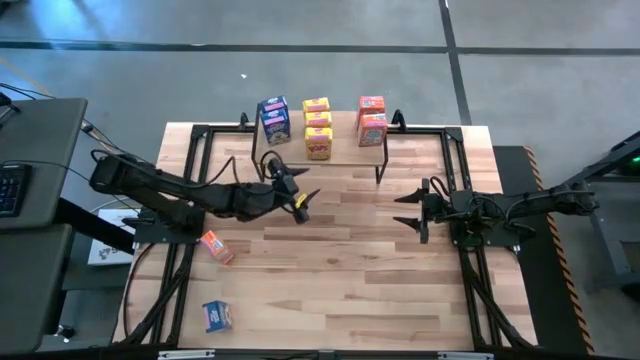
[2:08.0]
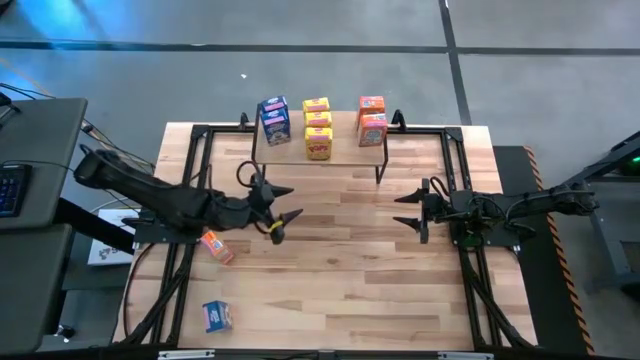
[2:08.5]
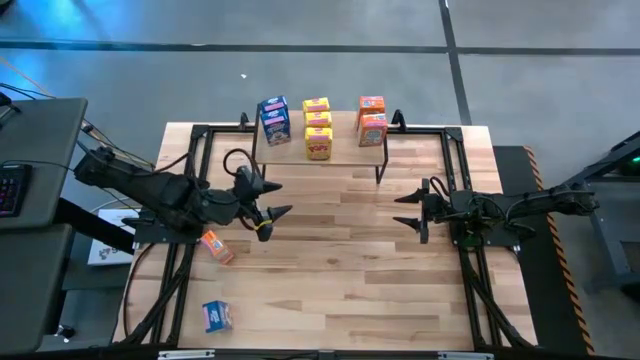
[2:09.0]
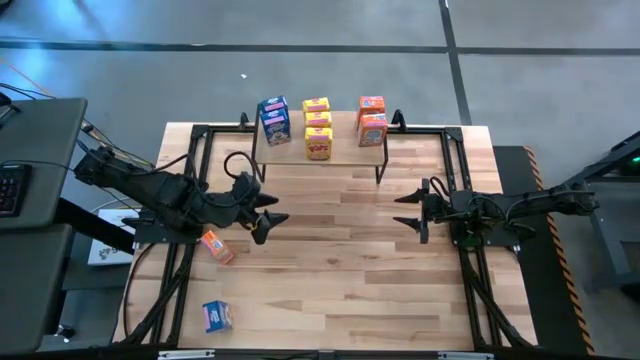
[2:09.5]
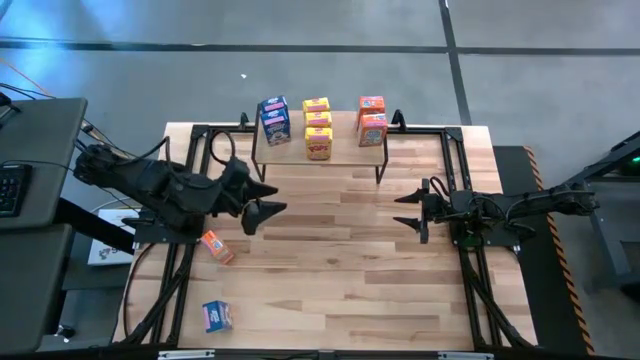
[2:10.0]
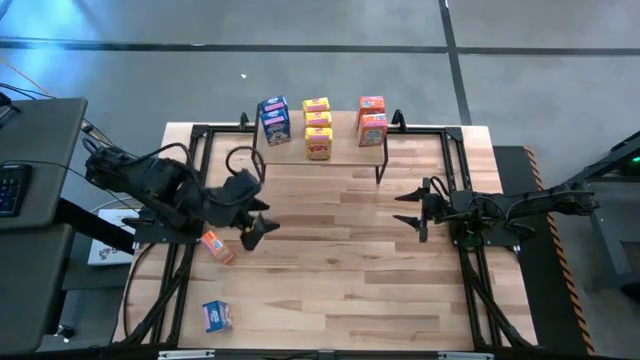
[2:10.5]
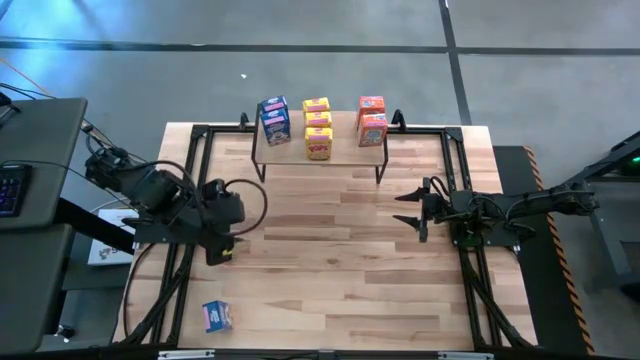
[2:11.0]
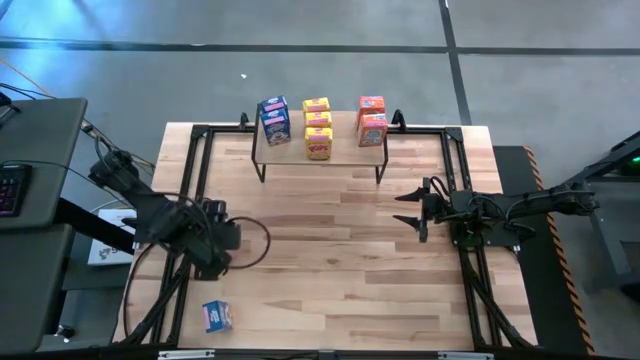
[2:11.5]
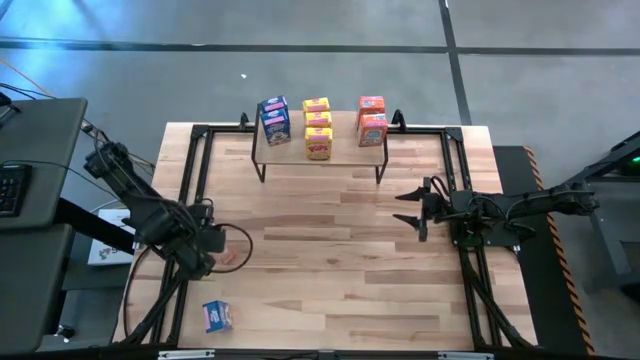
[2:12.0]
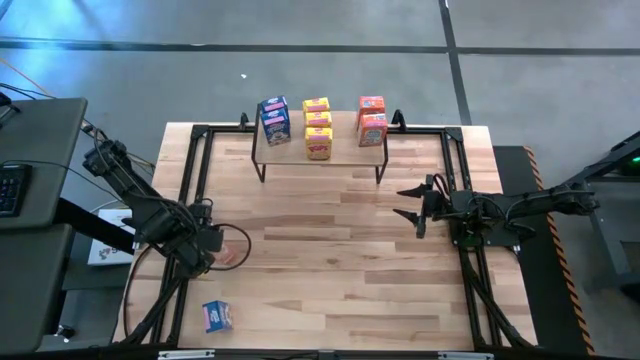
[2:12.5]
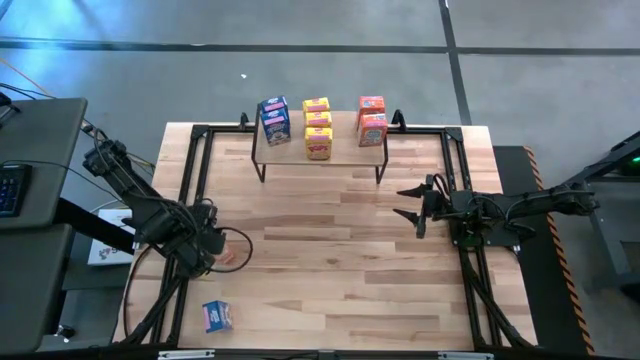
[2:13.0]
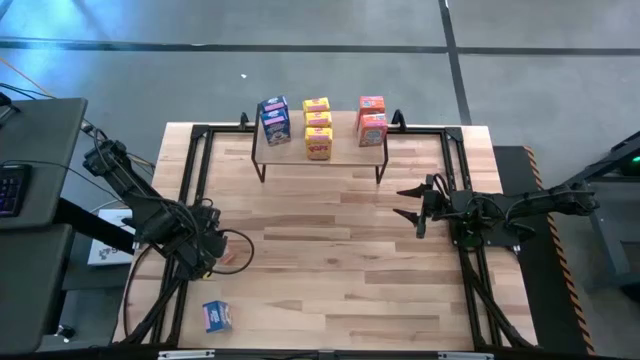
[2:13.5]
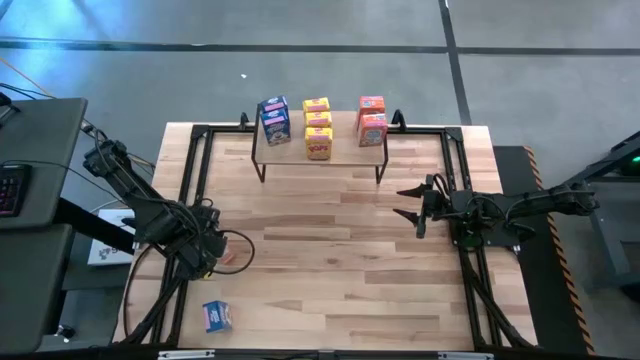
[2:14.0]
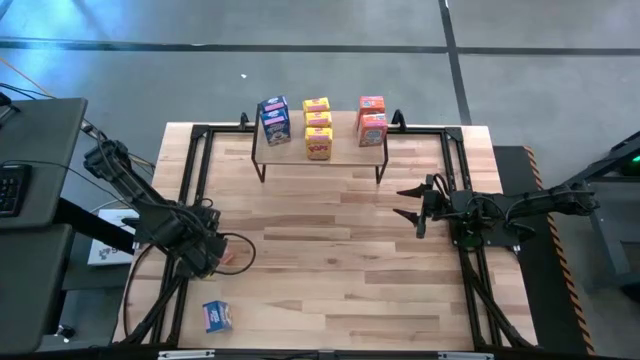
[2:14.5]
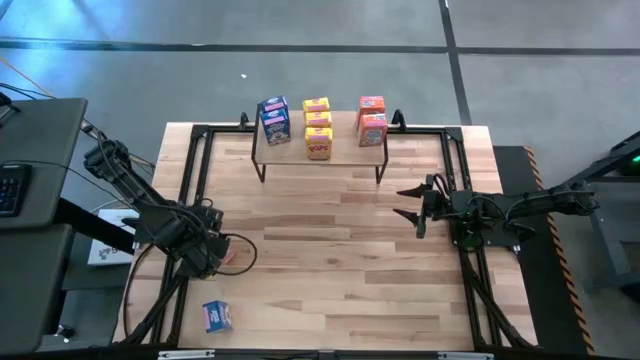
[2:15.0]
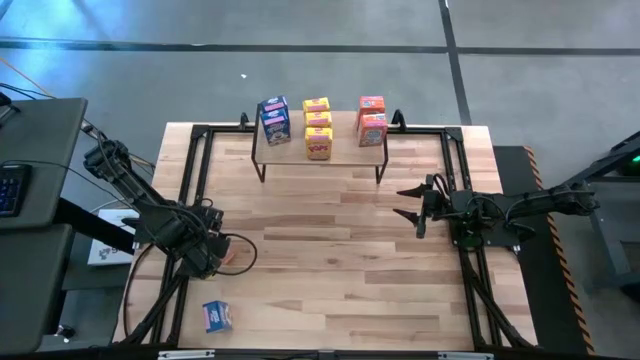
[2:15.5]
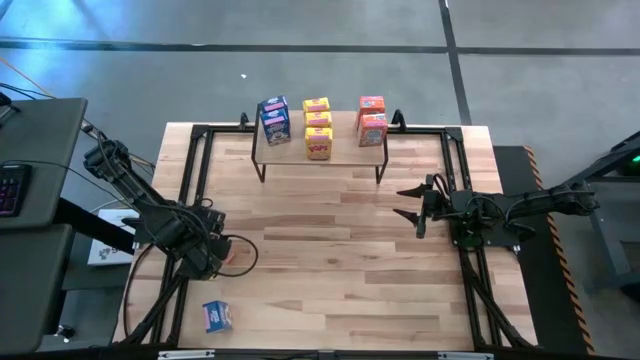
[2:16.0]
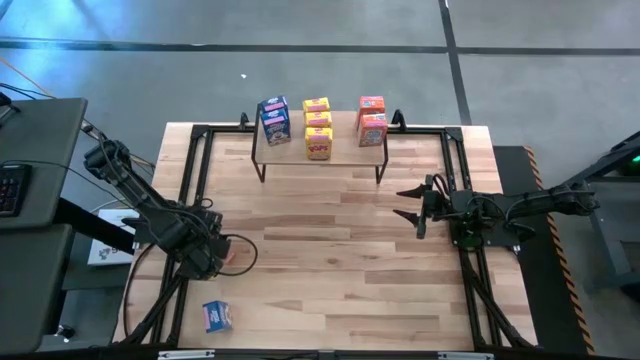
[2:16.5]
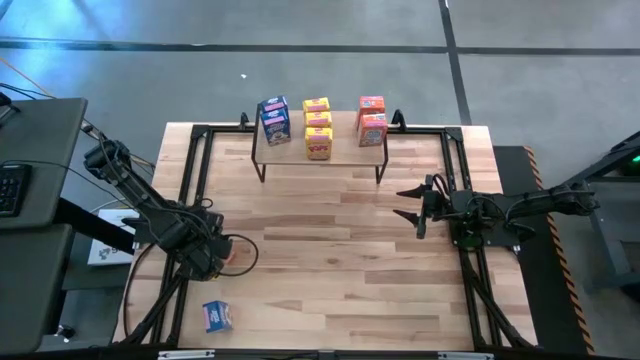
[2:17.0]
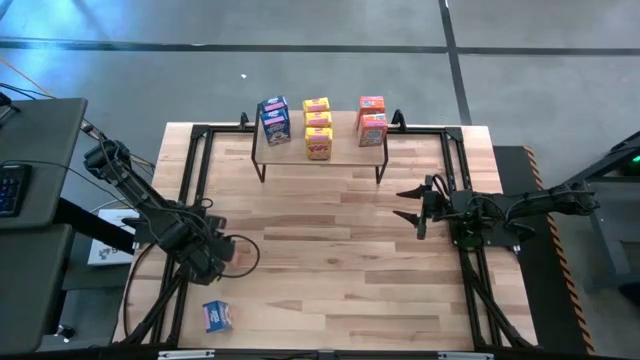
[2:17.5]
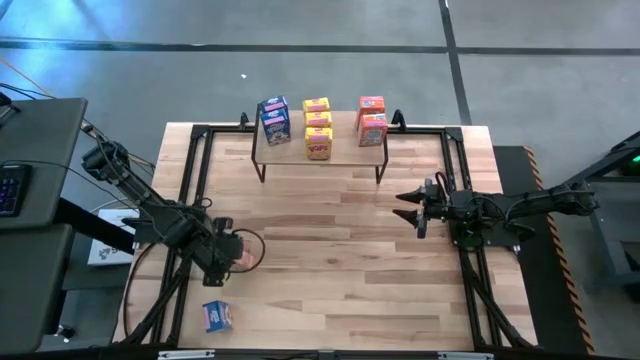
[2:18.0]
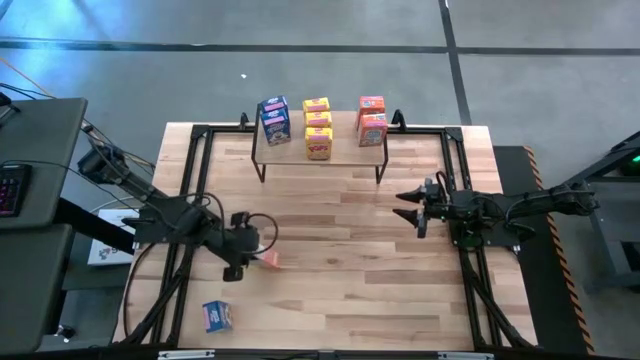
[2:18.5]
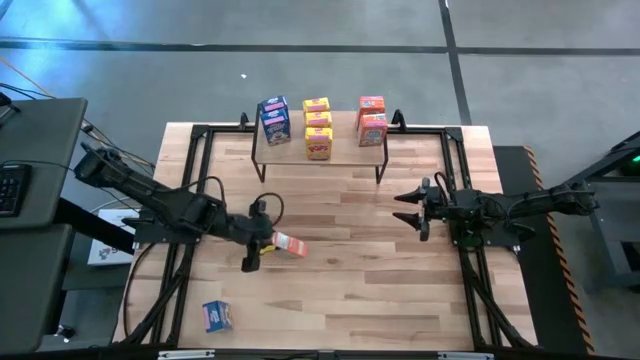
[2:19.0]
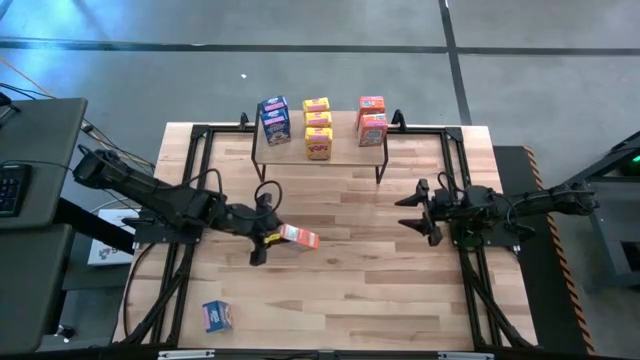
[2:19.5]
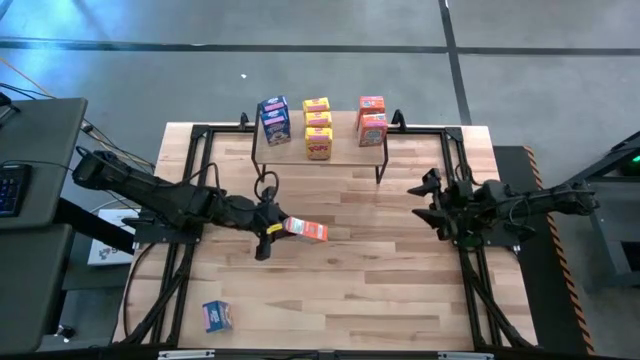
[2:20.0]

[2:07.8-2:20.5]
Task: Stack cereal on shelf
Put the orange cereal box and aligned with the other orange cereal boxes on the shelf

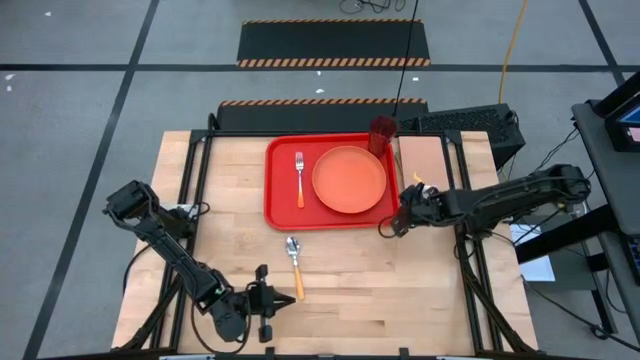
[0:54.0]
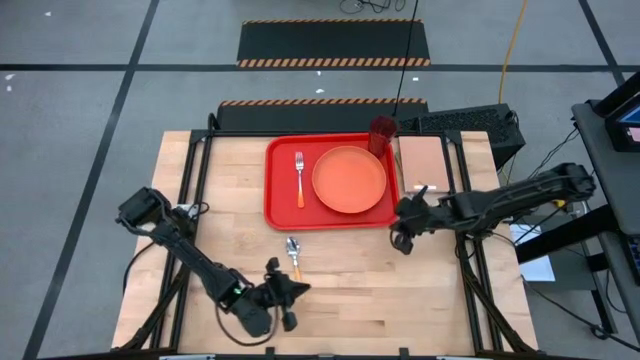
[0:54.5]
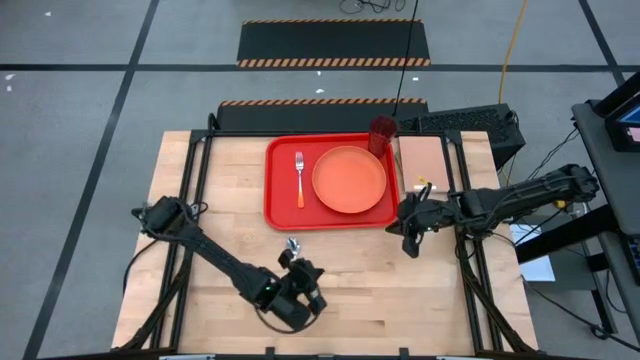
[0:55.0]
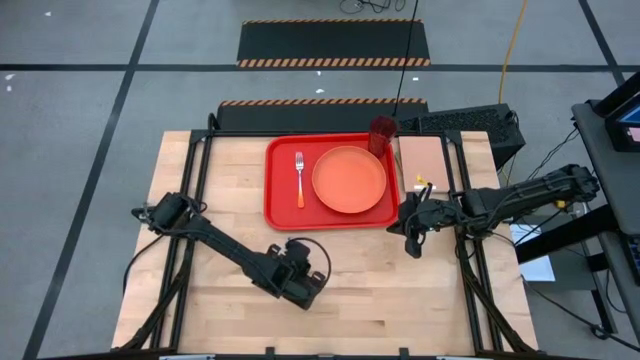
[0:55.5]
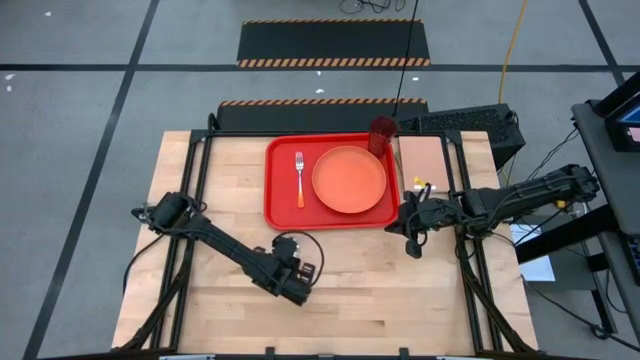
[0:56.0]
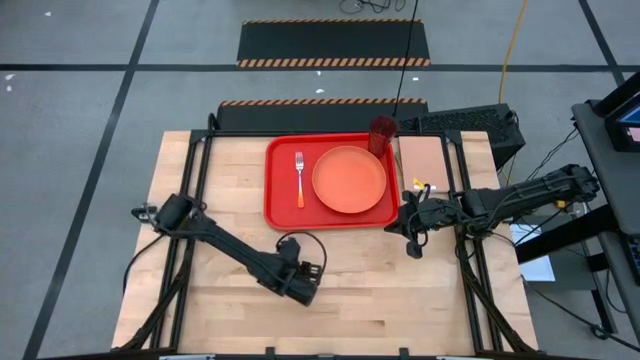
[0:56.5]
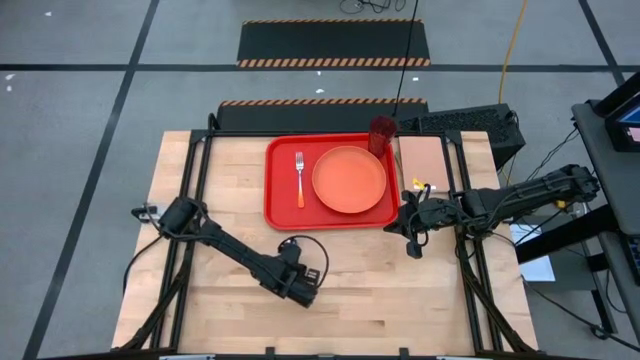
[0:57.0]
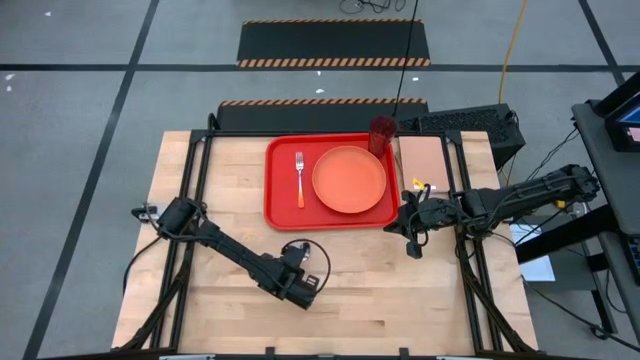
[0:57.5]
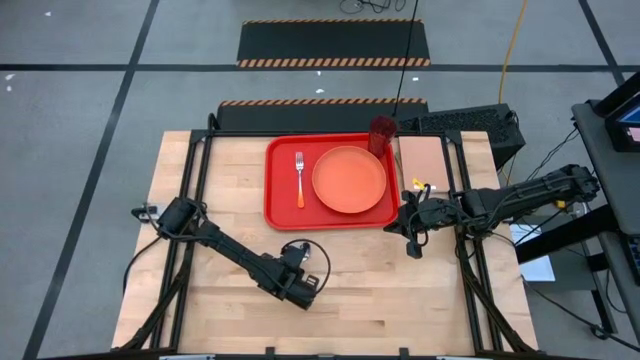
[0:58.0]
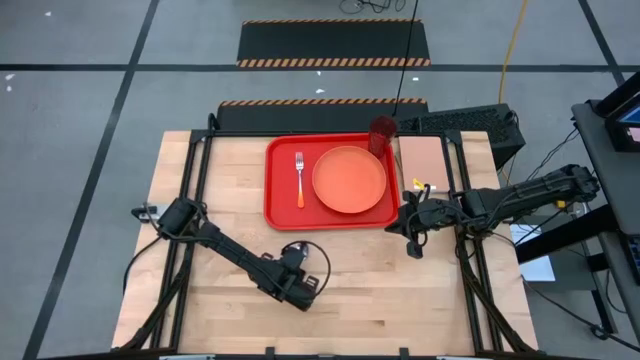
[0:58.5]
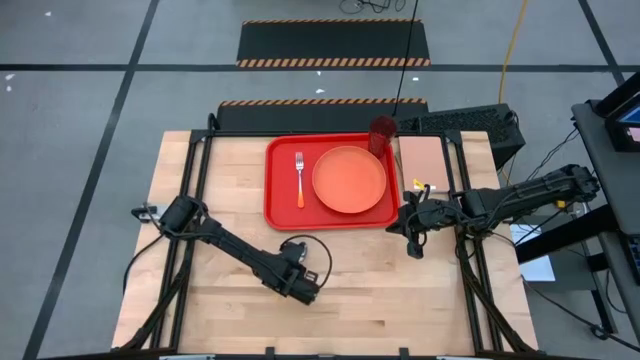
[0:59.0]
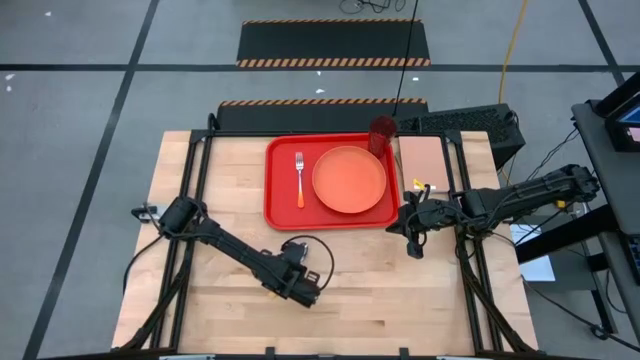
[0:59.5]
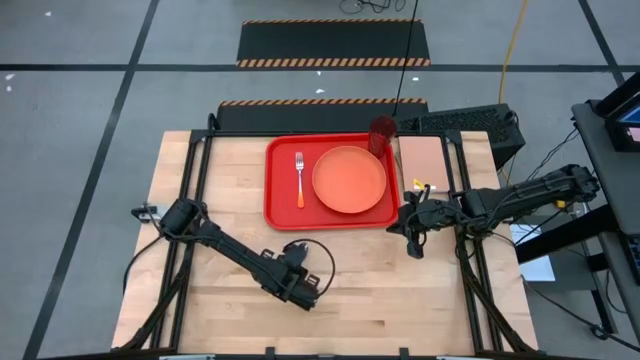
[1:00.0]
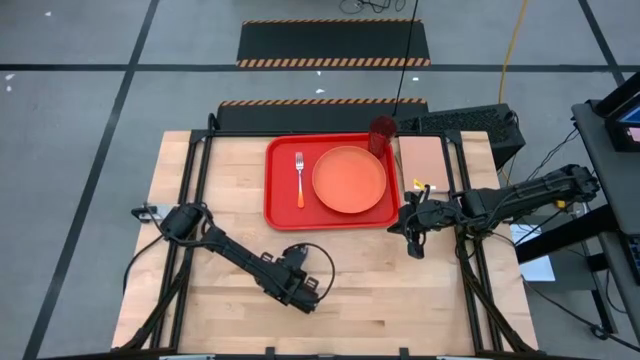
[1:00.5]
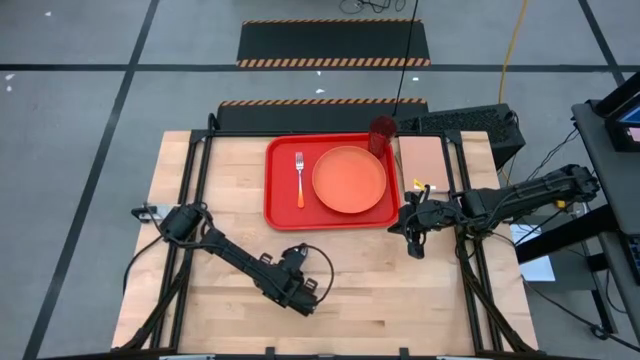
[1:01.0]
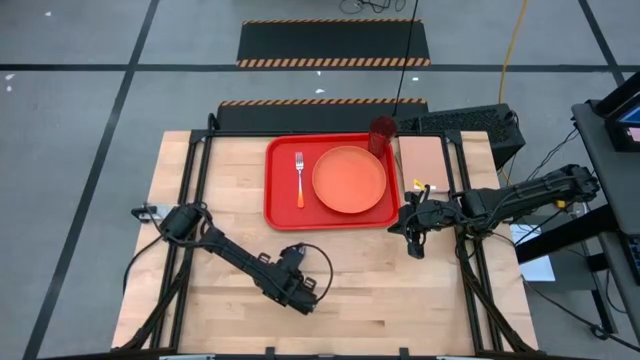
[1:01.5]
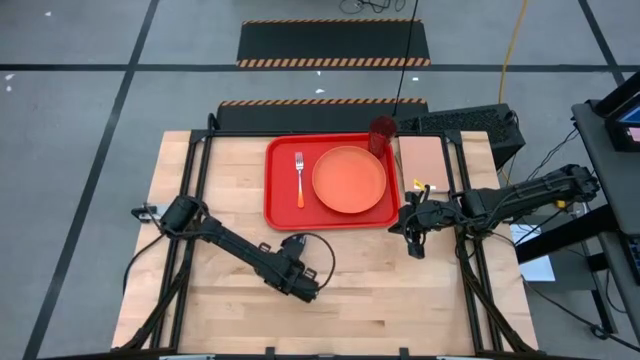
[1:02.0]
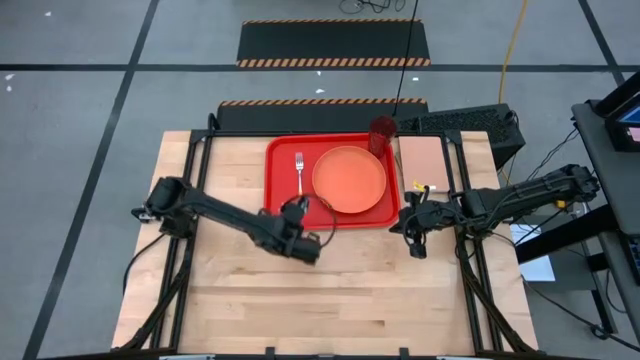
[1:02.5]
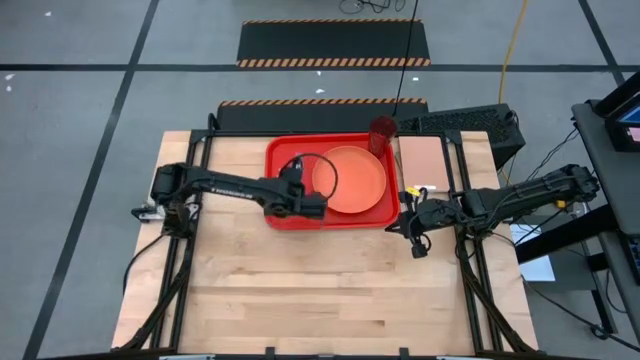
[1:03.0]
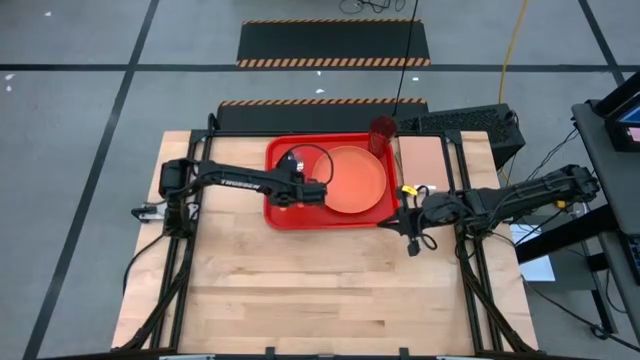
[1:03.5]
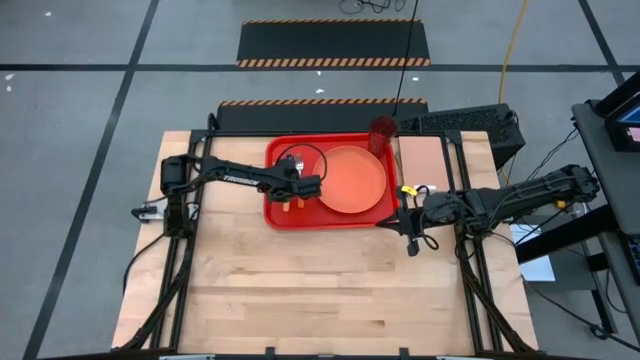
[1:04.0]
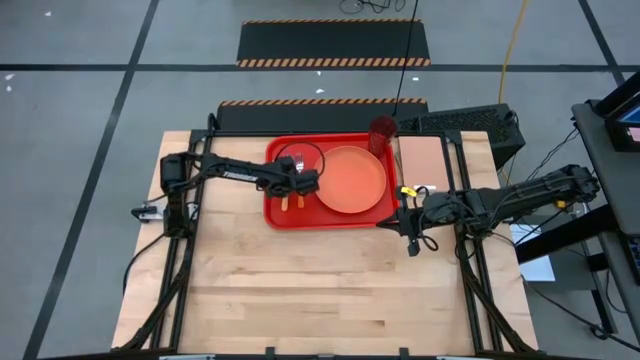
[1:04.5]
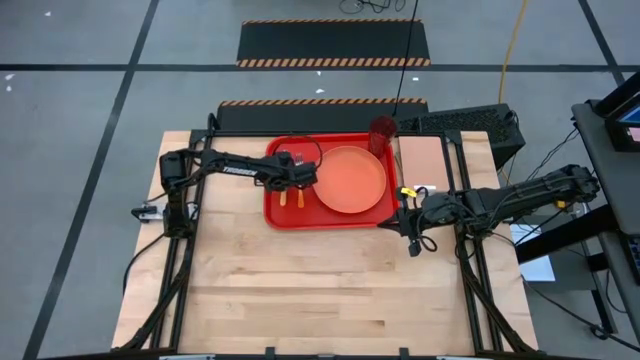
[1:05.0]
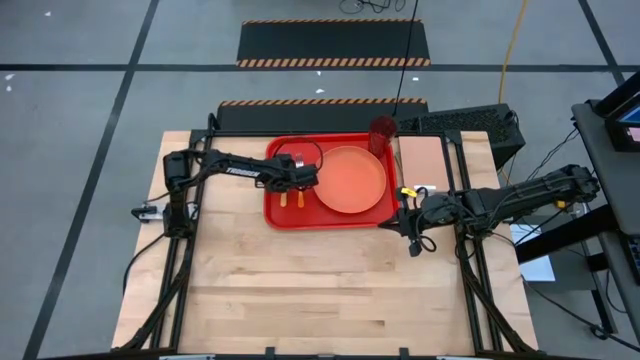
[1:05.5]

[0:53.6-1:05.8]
Task: Pick and place plate/cup/fork/spoon on tray
Put the yellow spoon to the left side of the orange fork on the red serving tray
